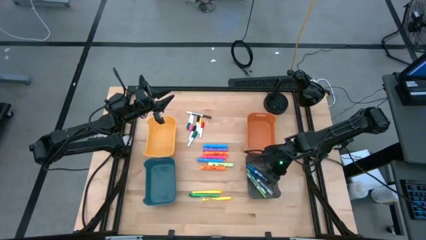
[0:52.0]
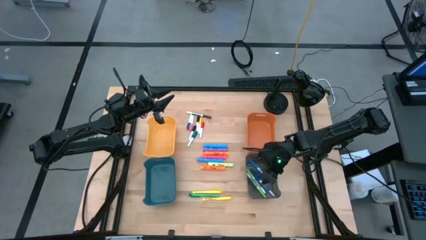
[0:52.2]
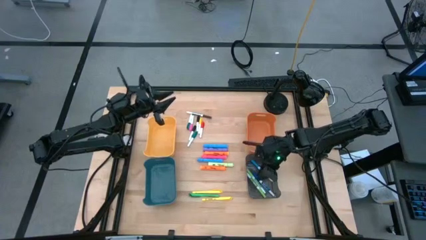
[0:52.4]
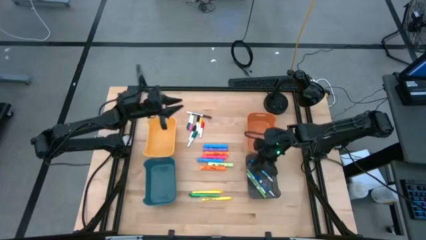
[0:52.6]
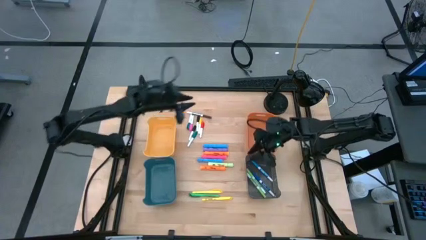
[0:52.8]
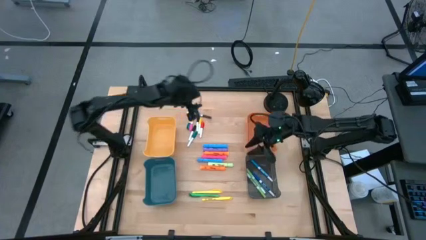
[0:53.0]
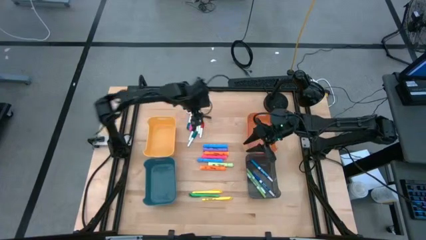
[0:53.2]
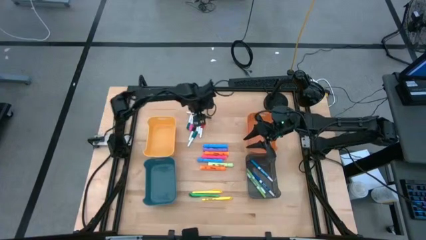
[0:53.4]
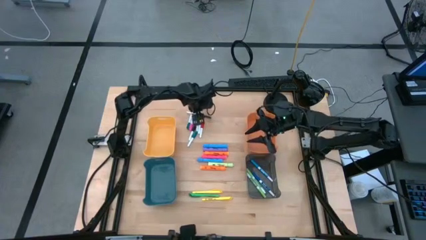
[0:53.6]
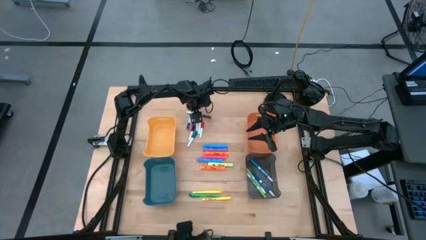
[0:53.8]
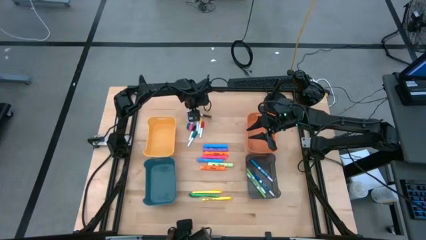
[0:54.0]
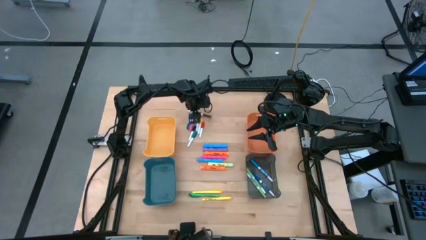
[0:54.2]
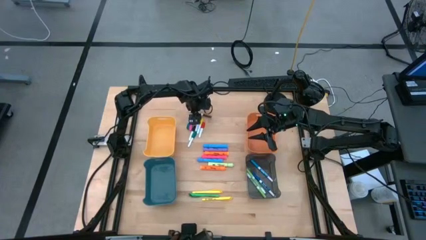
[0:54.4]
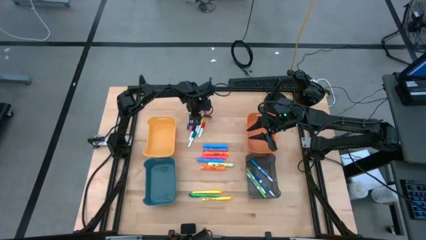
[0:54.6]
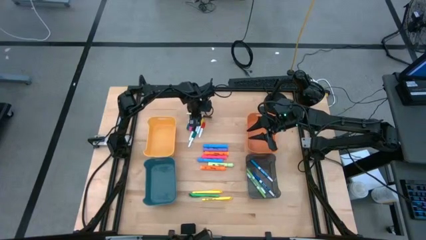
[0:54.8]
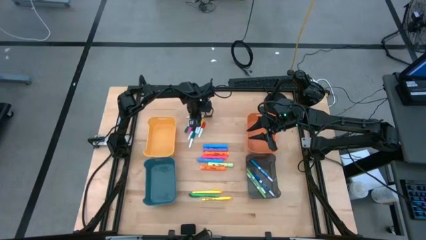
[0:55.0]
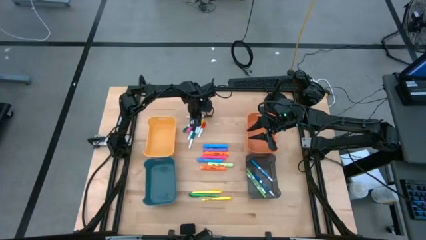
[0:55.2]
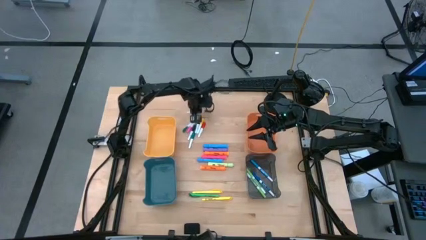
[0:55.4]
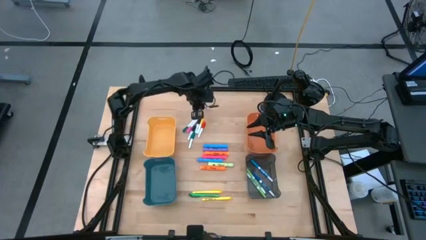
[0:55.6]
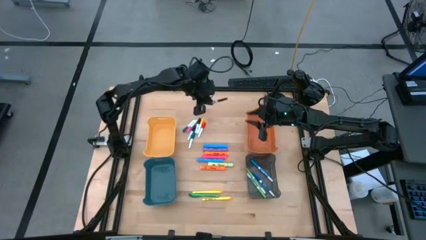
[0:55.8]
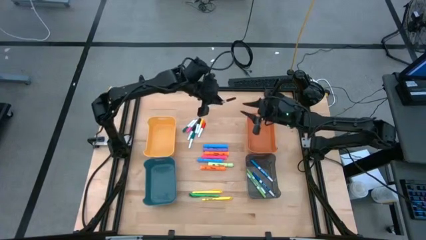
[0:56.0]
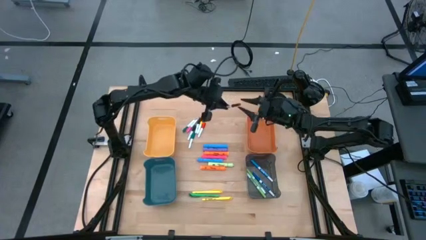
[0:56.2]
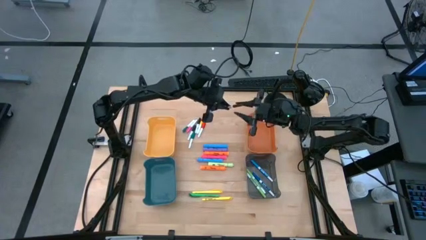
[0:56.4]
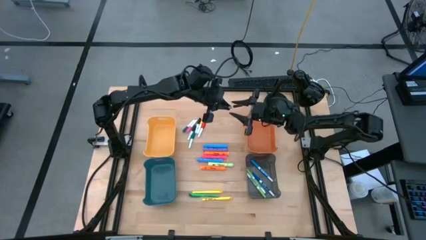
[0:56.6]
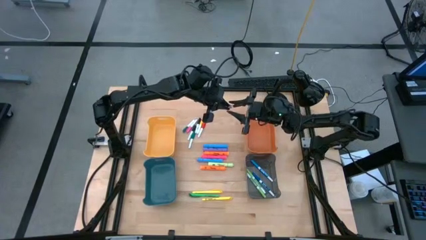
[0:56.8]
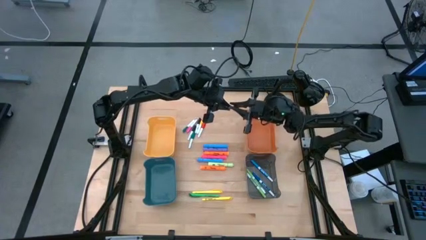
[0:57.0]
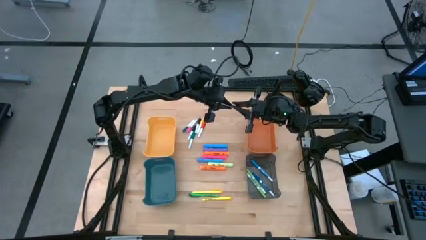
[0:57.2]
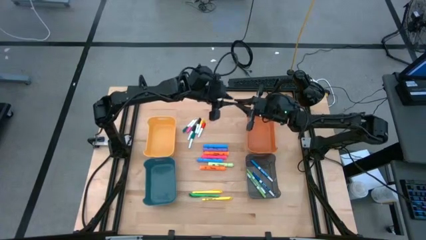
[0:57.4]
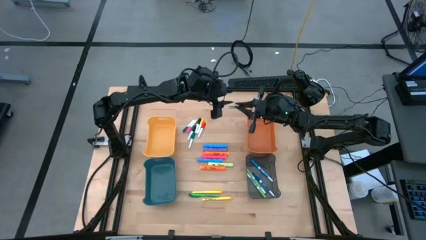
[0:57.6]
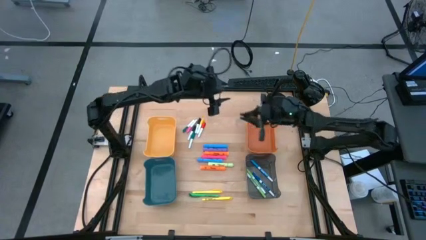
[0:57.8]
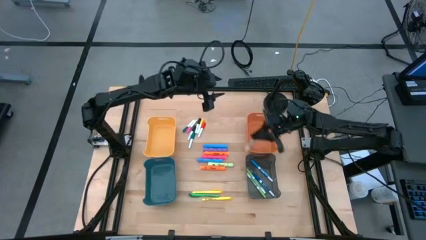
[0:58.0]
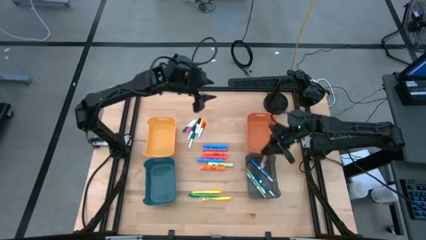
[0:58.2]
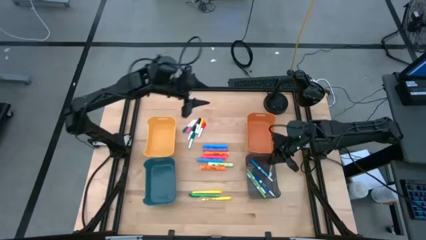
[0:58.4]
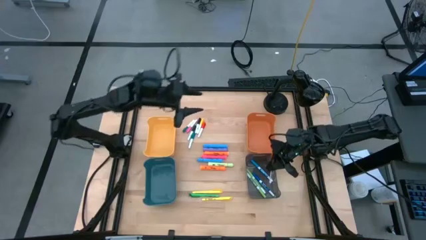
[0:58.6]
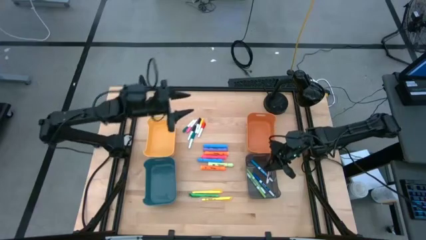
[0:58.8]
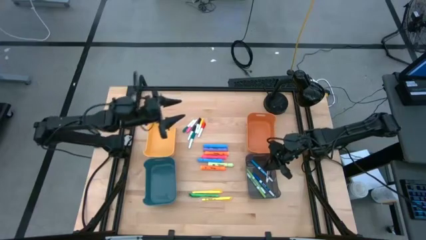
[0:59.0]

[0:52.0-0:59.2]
Task: Pick & Place Markers
Put the brown dry erase marker into the black bin

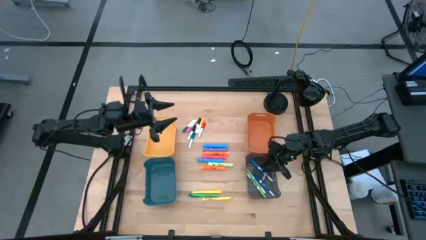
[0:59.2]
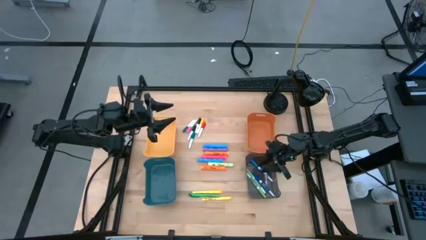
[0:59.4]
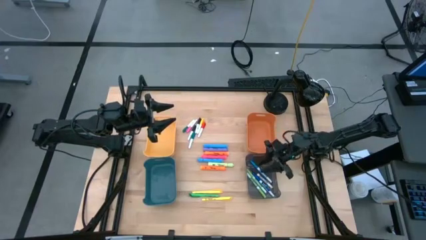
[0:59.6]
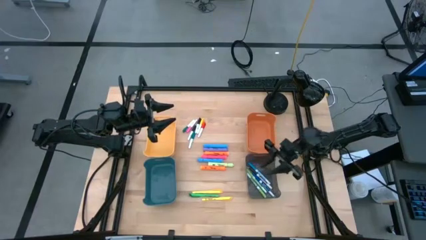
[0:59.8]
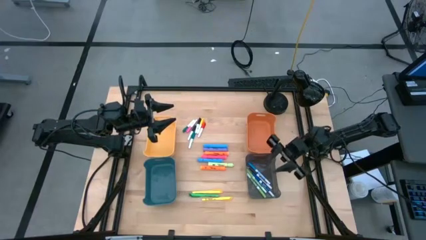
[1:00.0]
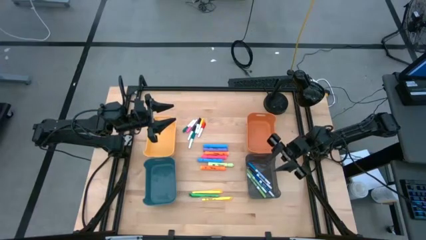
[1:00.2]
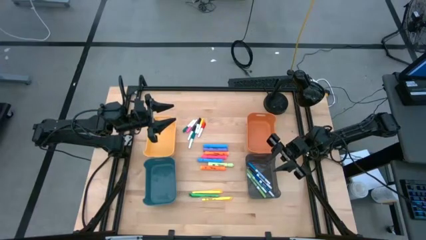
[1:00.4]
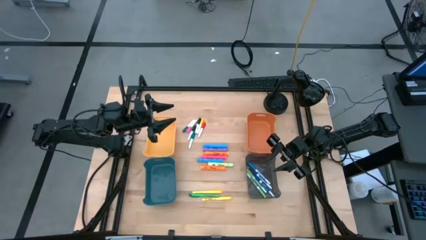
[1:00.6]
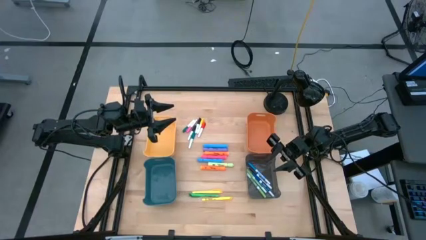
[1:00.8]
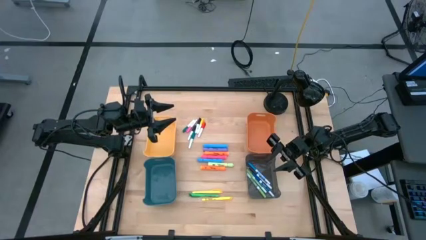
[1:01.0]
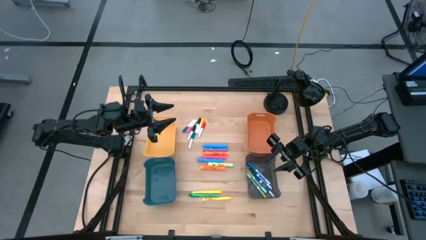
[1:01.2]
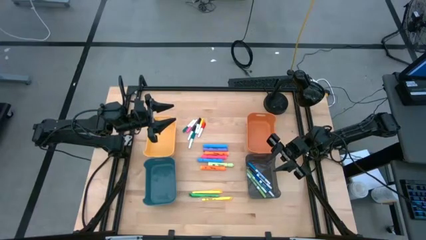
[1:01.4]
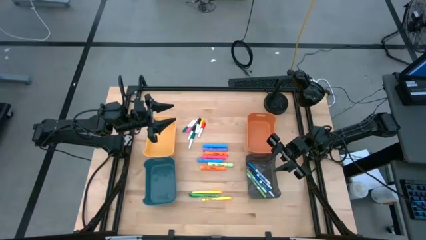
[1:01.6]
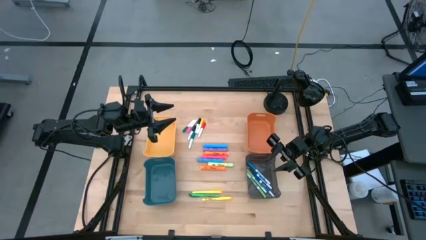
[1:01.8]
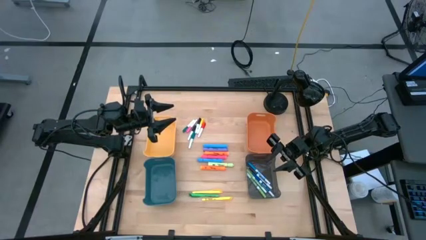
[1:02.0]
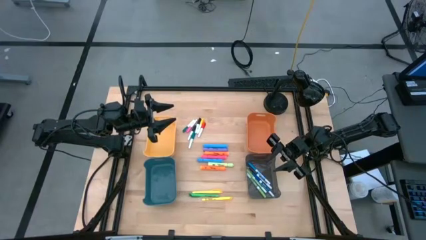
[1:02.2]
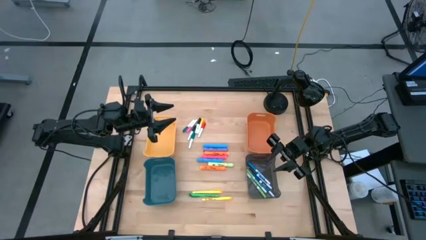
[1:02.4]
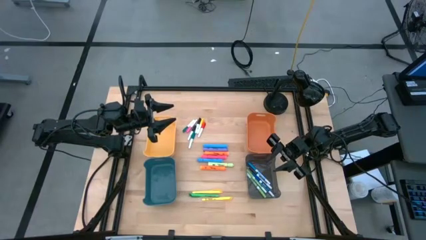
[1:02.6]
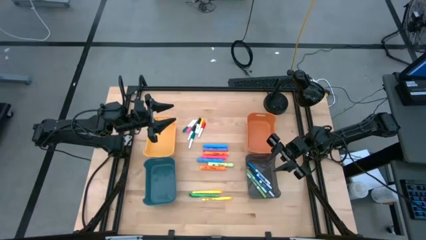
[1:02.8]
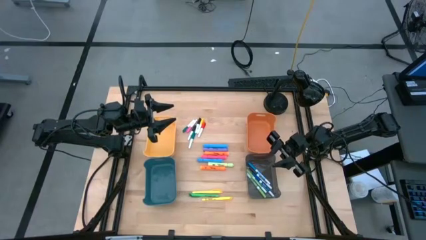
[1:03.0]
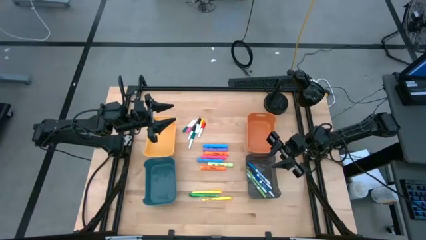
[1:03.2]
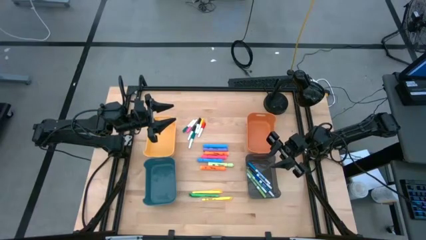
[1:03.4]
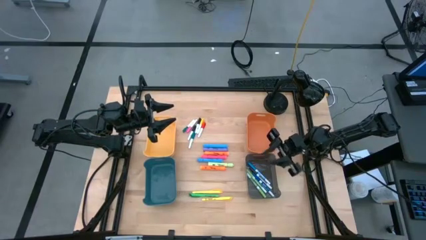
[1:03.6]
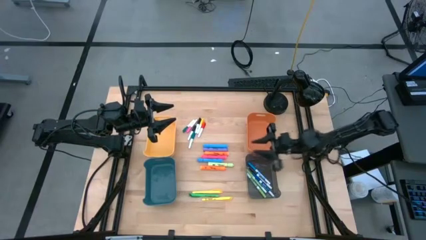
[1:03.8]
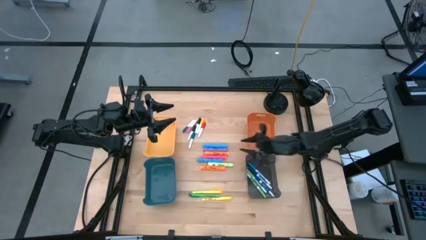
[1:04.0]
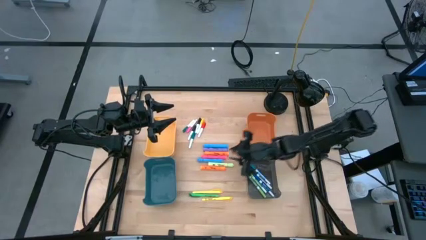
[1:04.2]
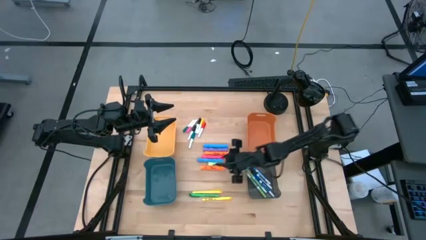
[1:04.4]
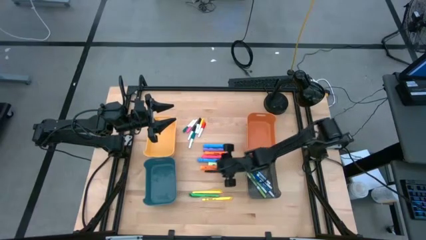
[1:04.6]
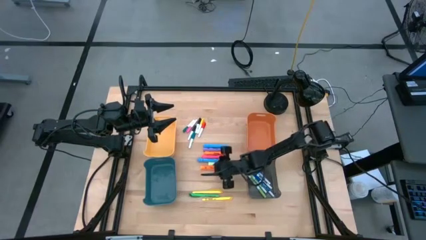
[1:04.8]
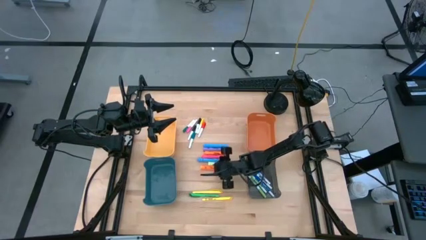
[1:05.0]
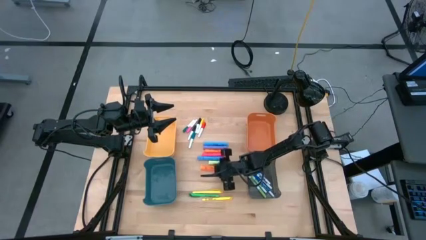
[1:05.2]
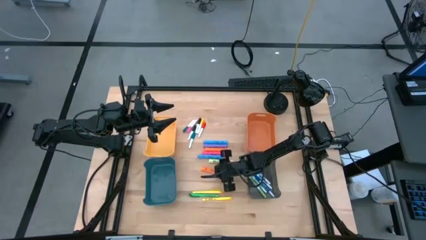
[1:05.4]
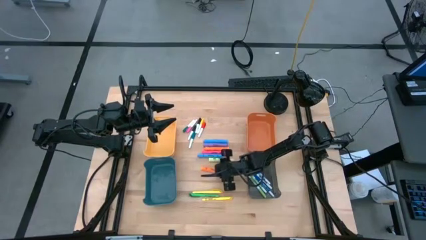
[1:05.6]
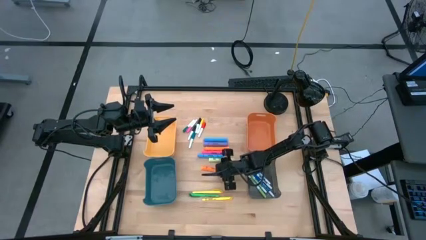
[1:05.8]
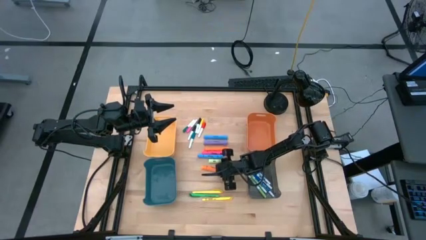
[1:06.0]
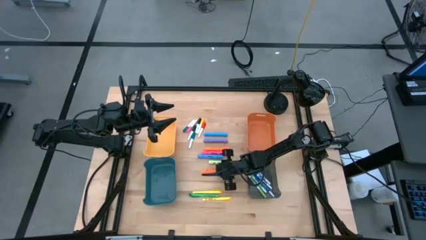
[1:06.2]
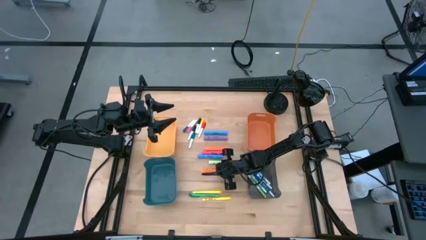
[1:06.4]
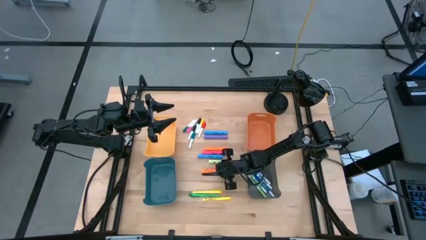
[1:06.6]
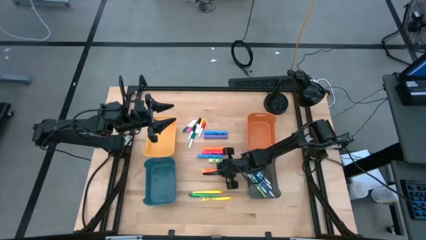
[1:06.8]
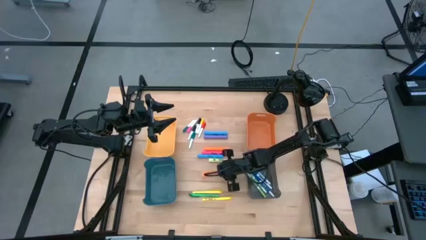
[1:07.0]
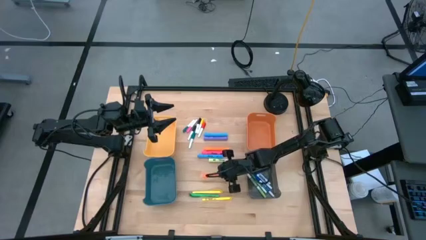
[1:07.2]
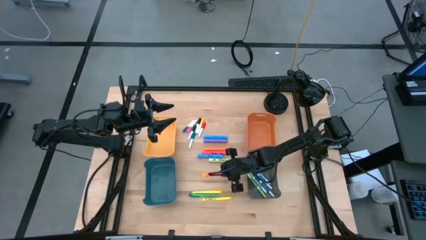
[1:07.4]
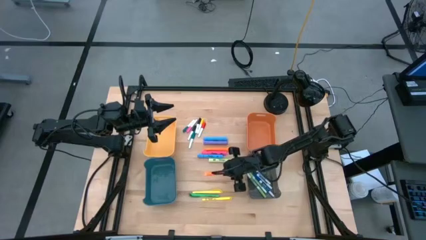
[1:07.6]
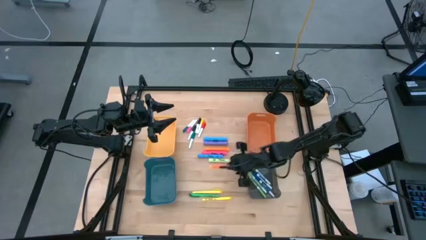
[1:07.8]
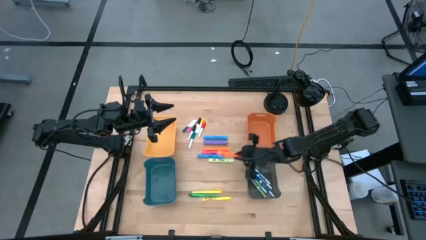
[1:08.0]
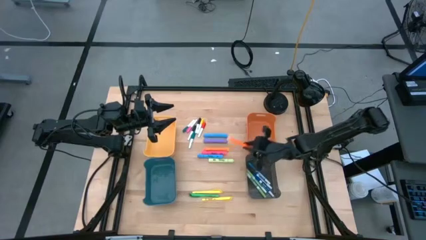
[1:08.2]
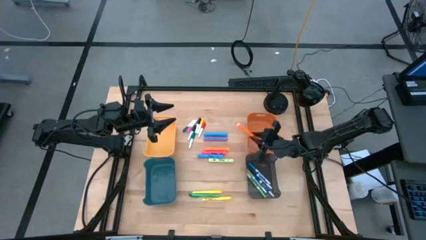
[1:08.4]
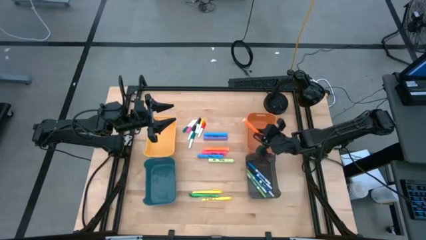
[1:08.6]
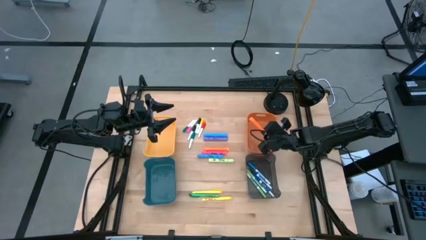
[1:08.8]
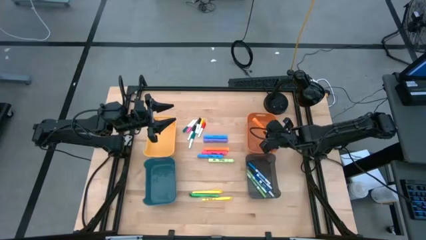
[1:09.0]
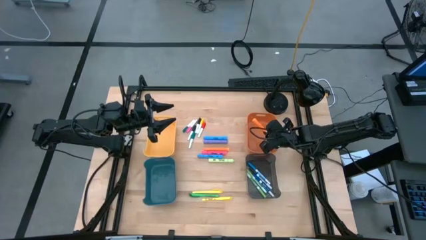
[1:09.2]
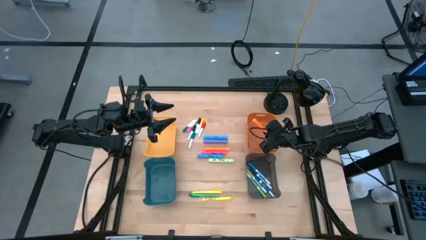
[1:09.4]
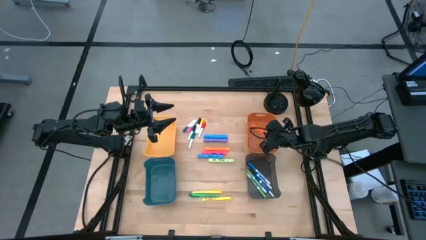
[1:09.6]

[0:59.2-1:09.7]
Put the bottom orange highlighter into the orange bin
